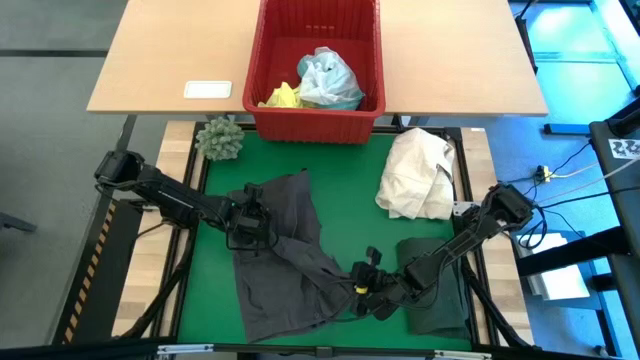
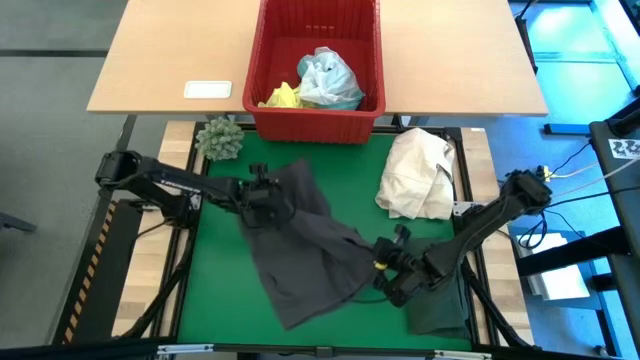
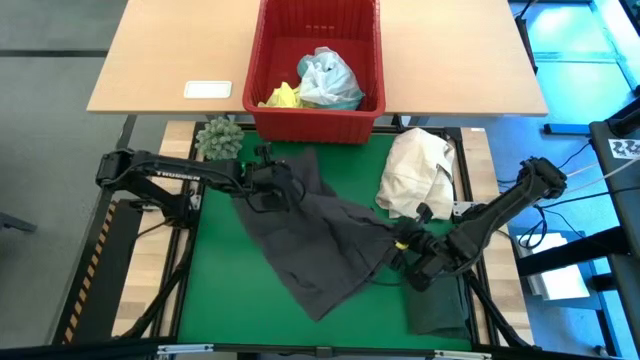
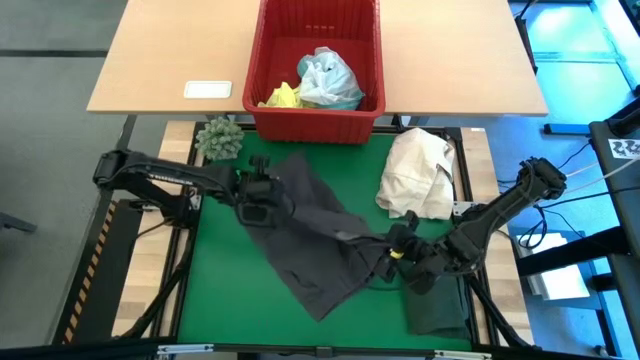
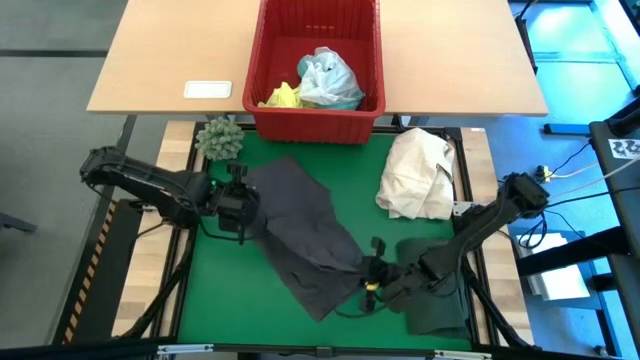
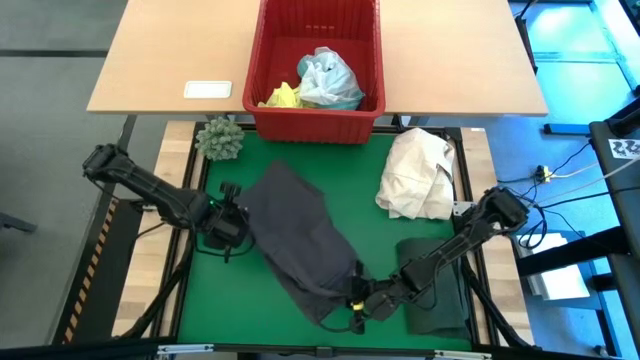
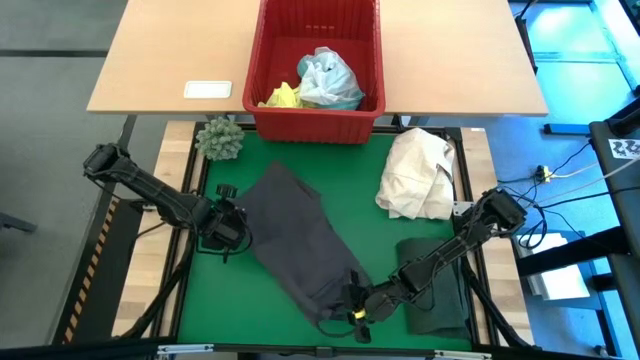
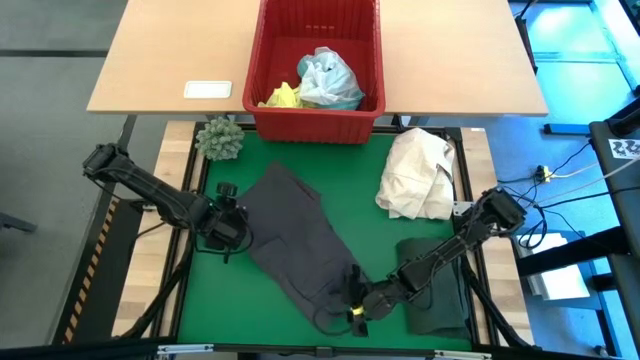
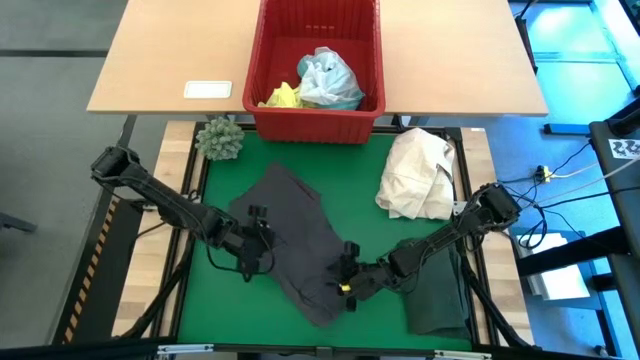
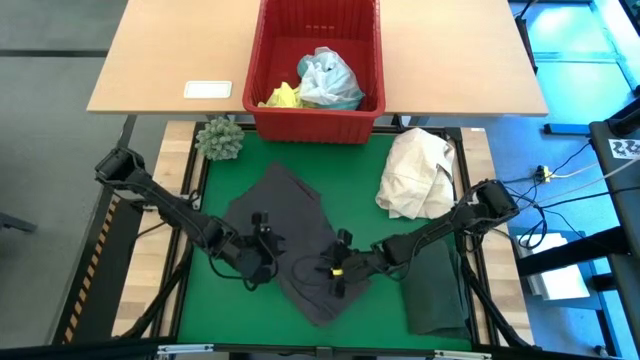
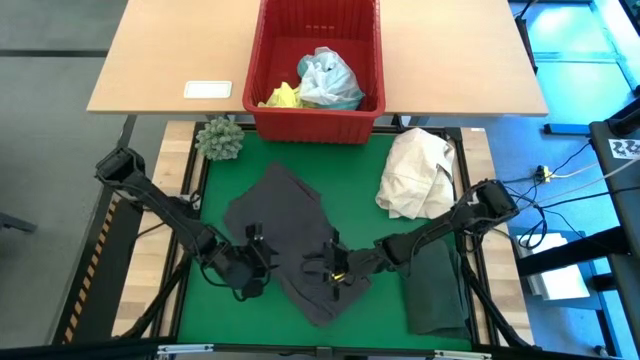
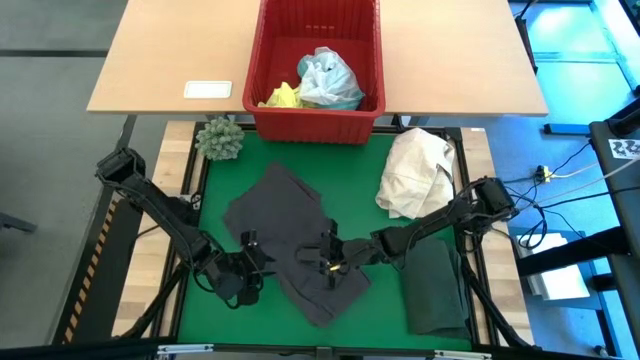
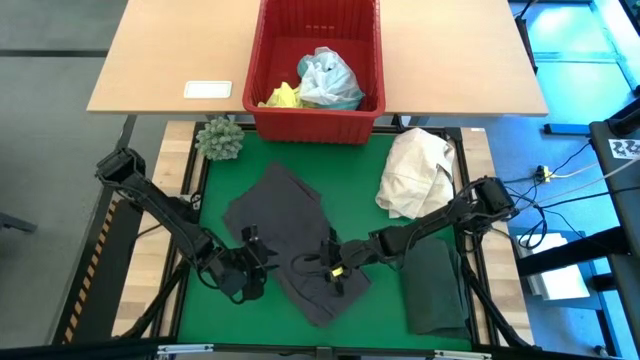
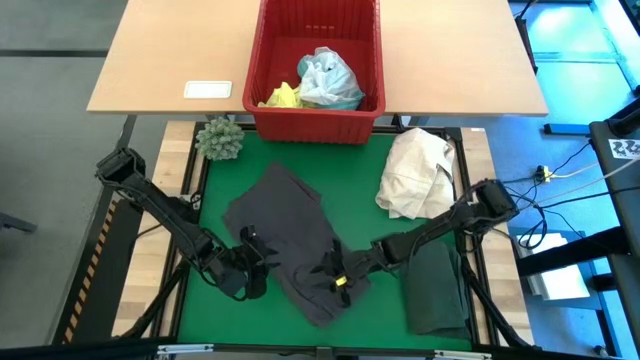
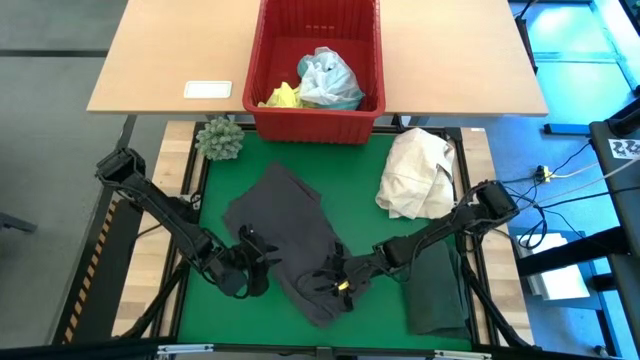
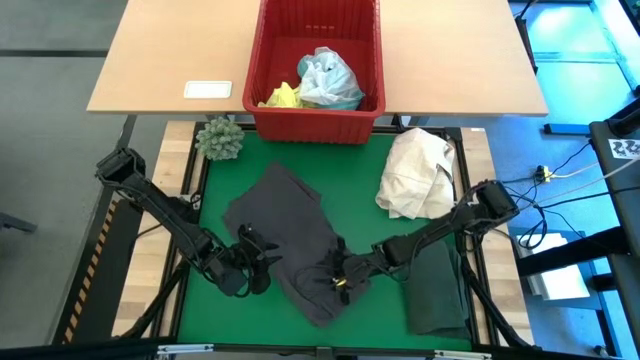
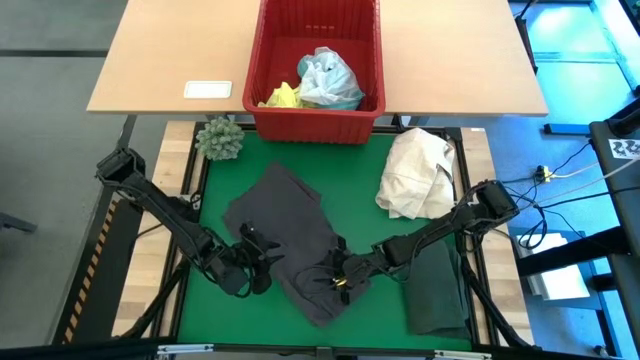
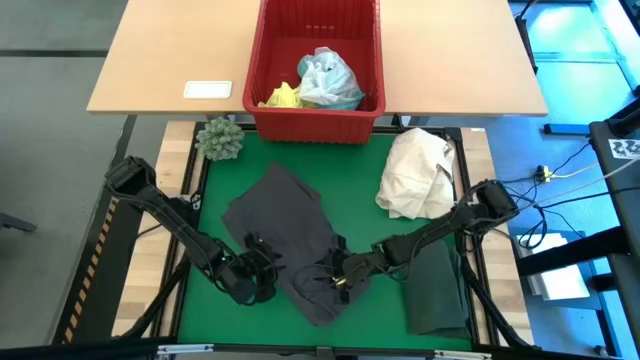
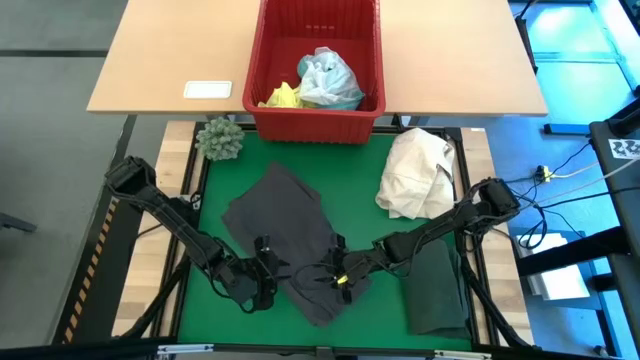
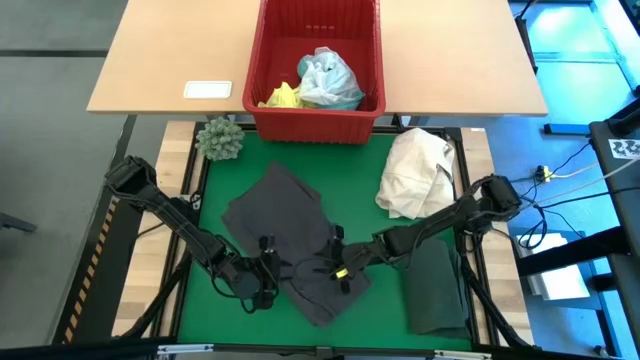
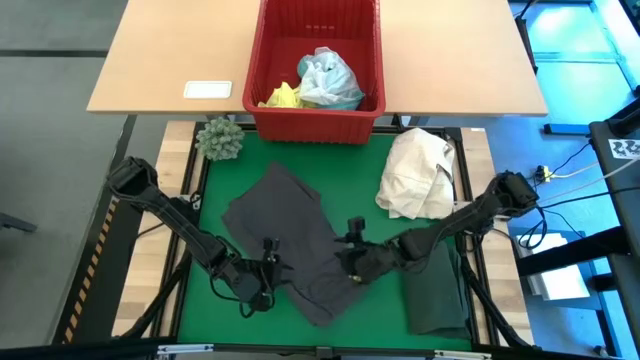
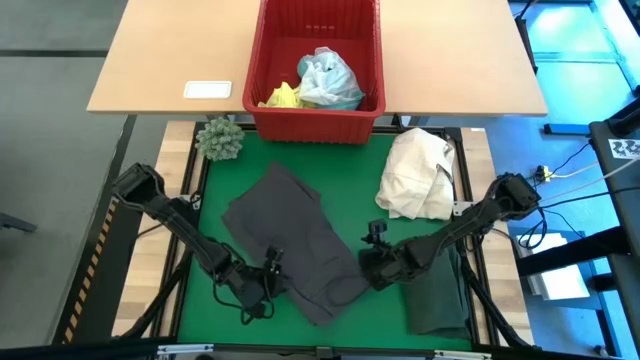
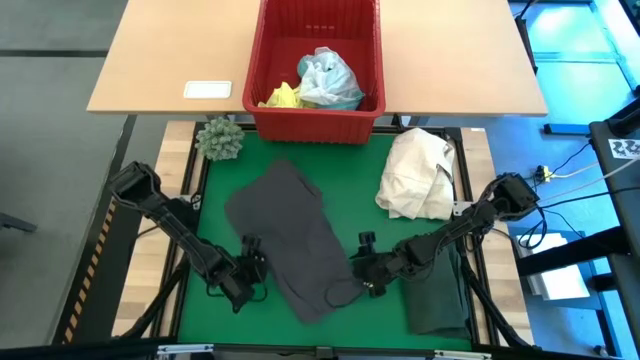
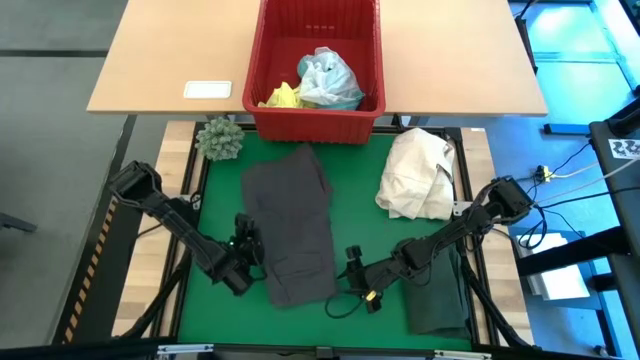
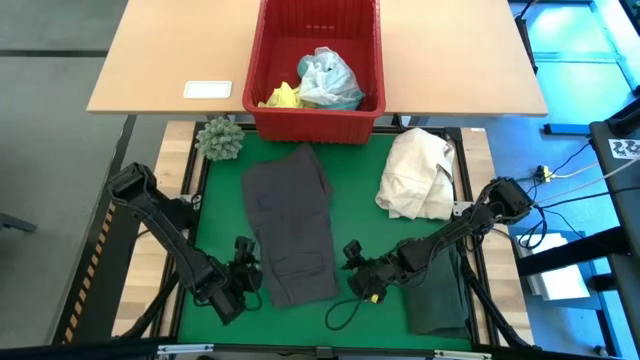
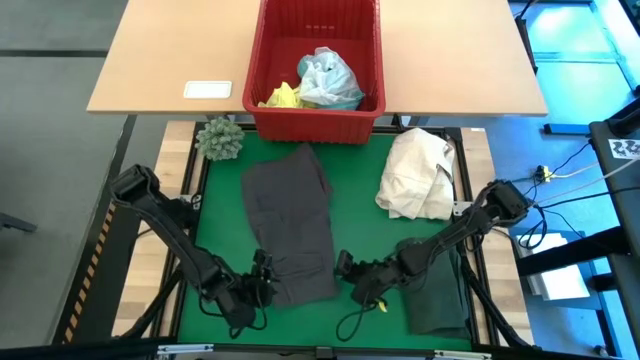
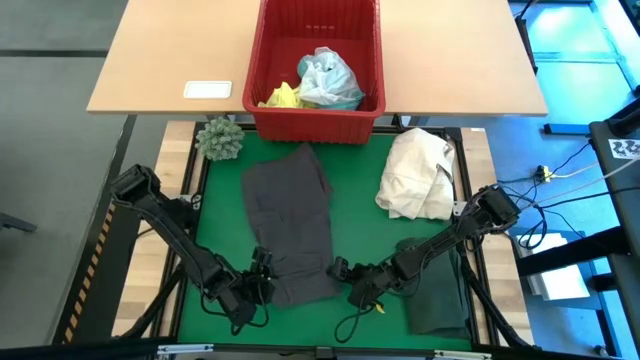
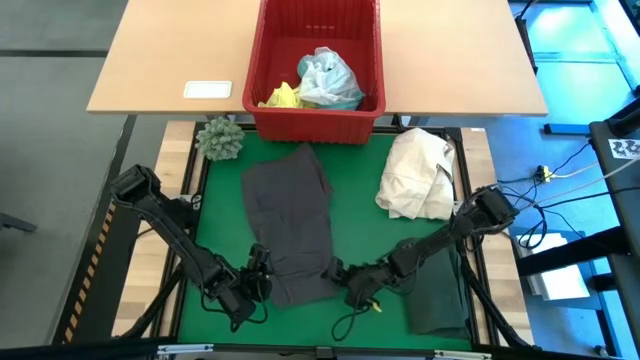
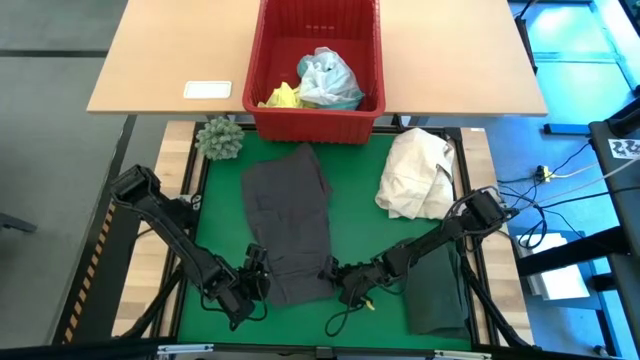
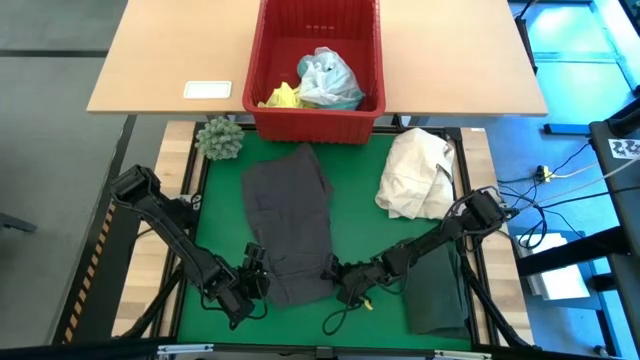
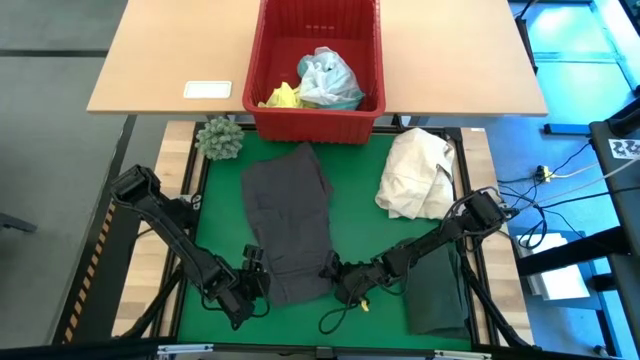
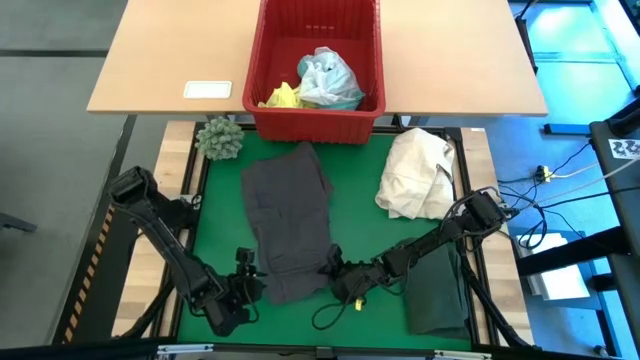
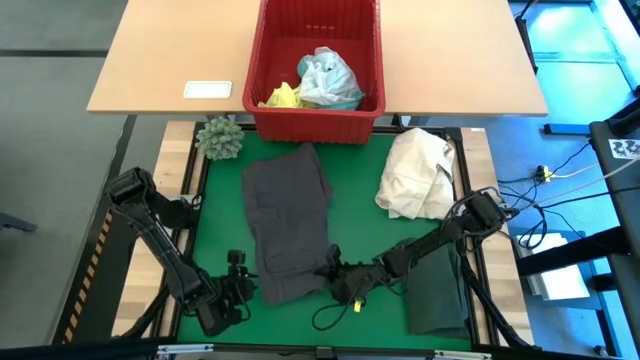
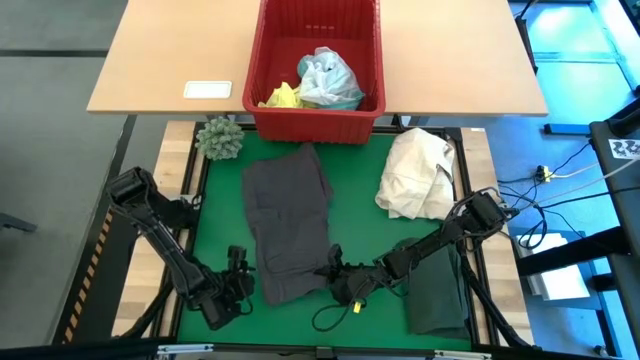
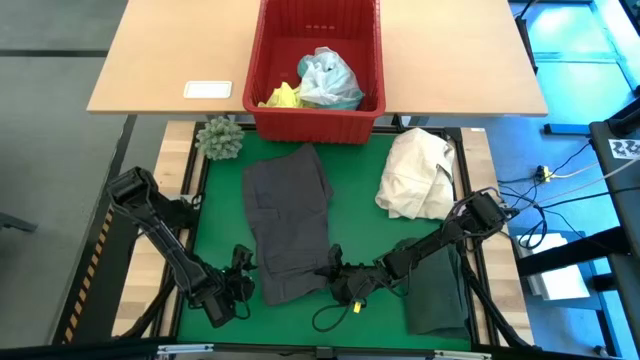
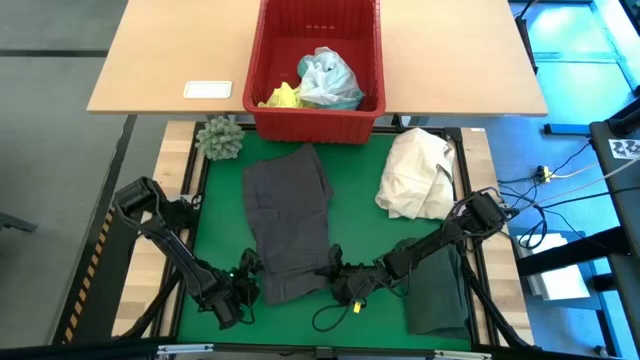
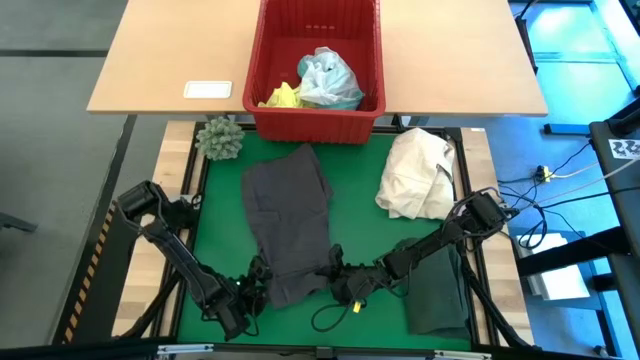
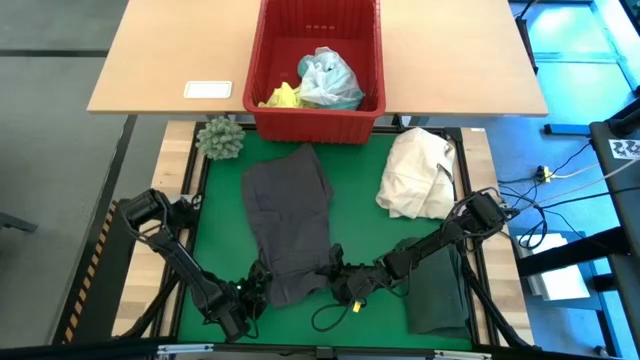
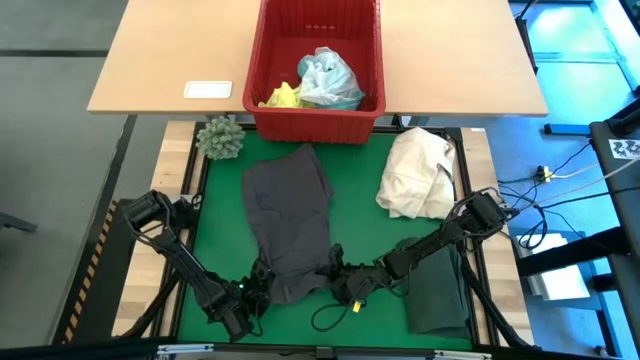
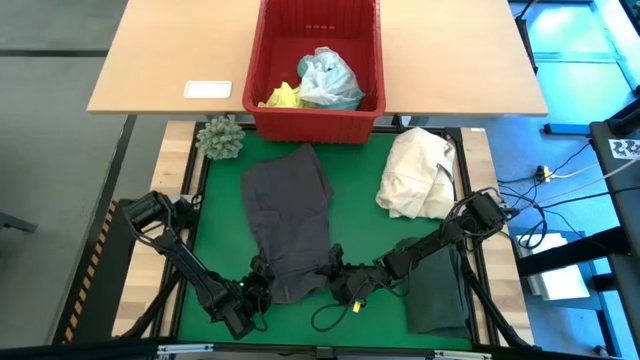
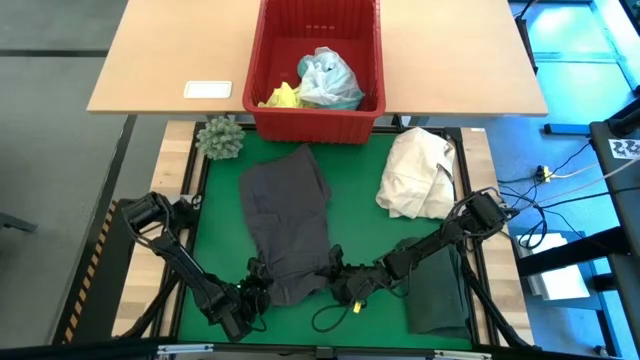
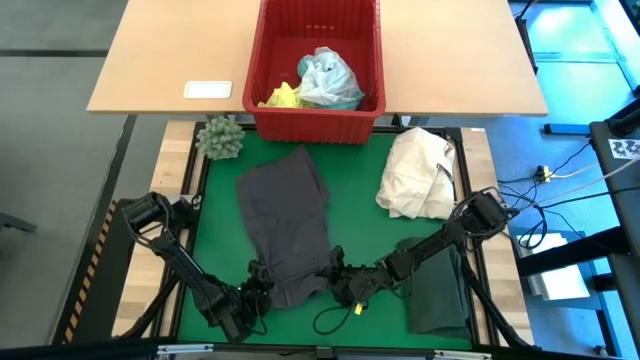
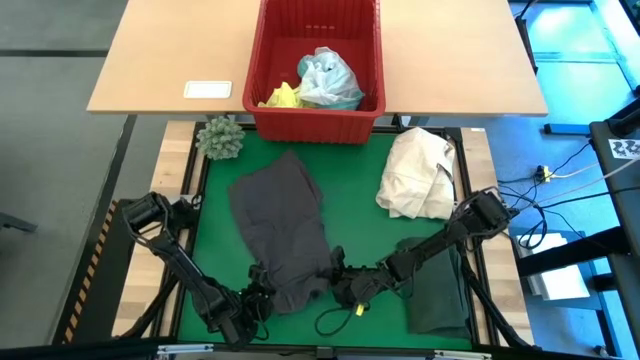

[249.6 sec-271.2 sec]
Task: Fold Laundry from Bin
Fold the gray short
